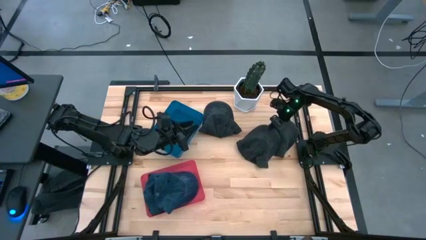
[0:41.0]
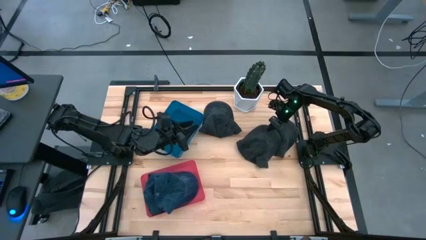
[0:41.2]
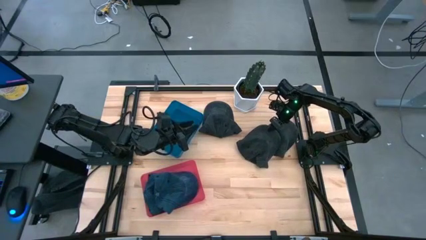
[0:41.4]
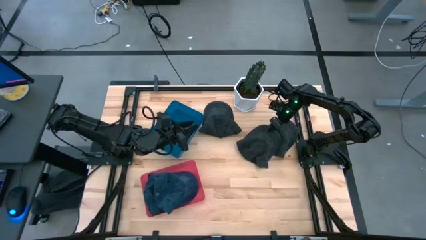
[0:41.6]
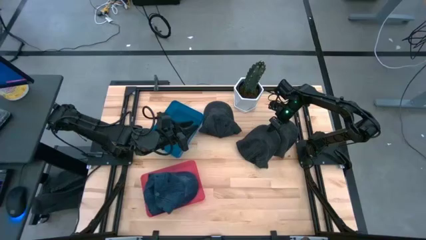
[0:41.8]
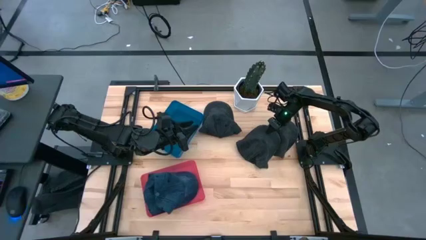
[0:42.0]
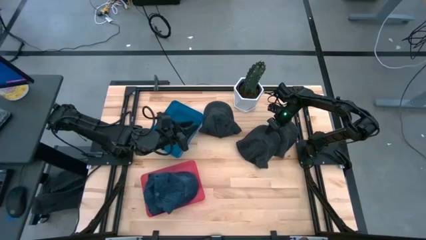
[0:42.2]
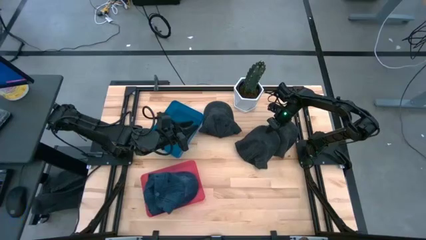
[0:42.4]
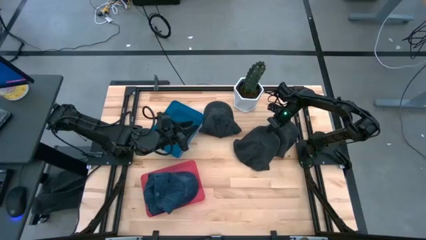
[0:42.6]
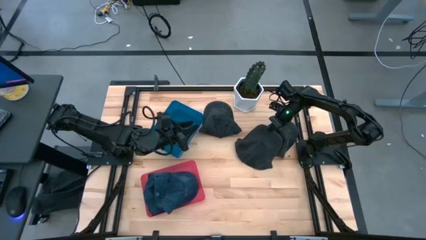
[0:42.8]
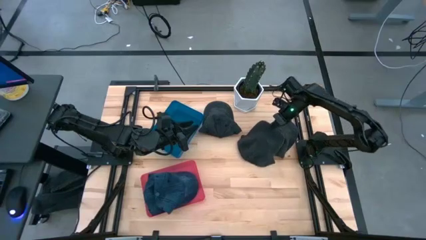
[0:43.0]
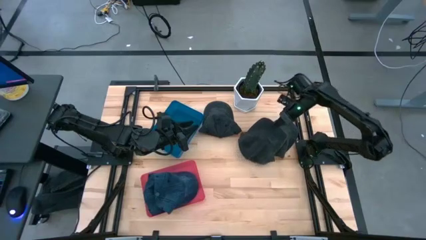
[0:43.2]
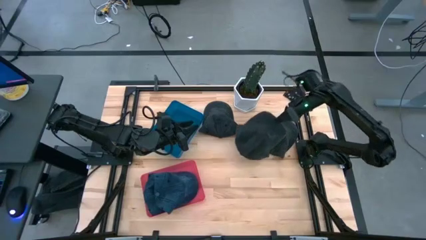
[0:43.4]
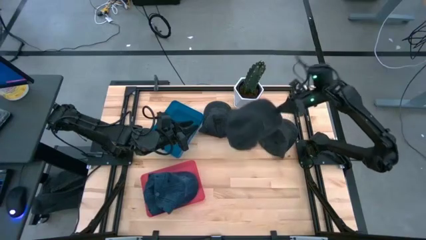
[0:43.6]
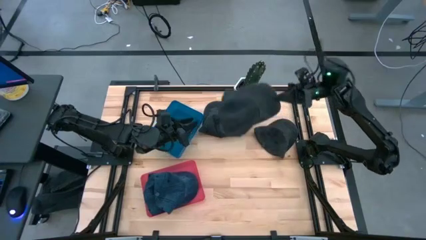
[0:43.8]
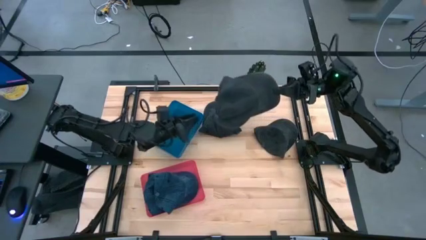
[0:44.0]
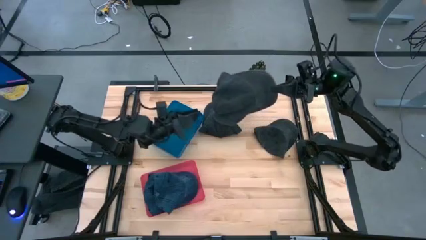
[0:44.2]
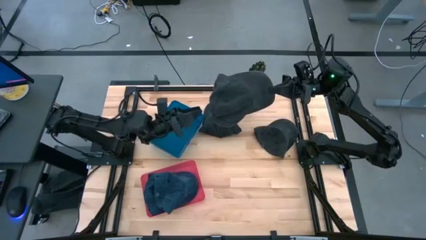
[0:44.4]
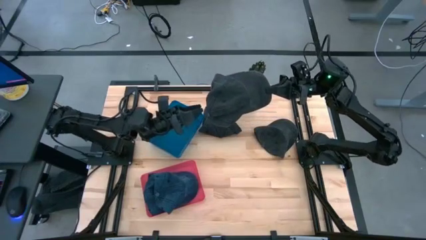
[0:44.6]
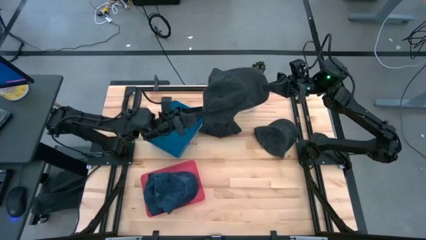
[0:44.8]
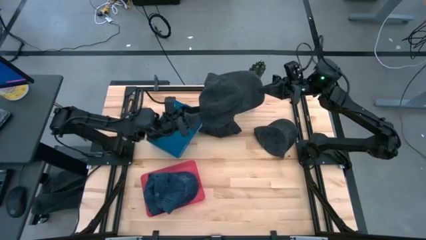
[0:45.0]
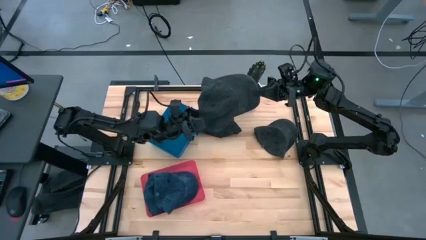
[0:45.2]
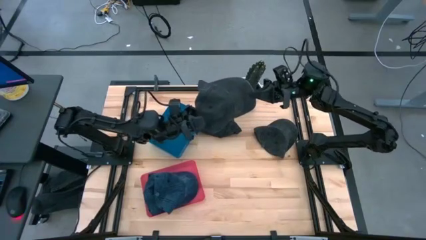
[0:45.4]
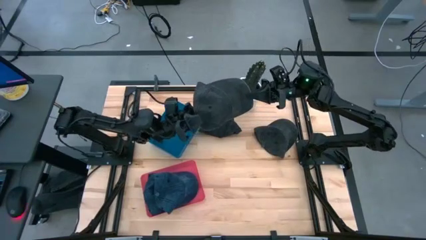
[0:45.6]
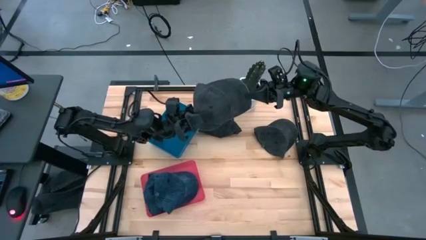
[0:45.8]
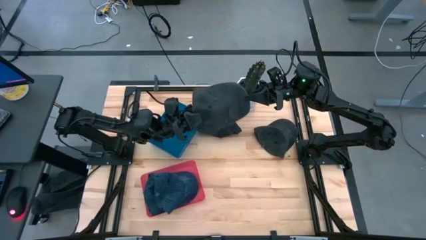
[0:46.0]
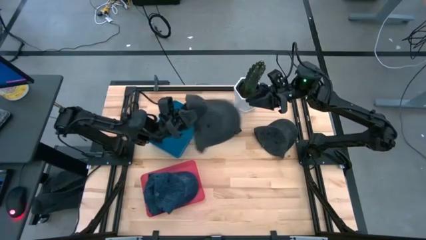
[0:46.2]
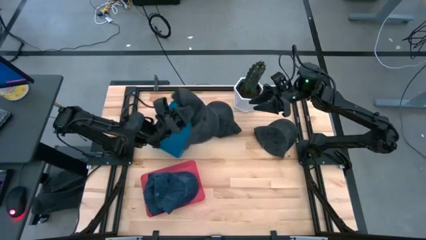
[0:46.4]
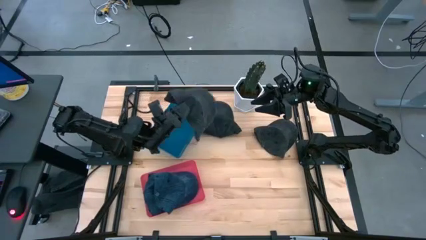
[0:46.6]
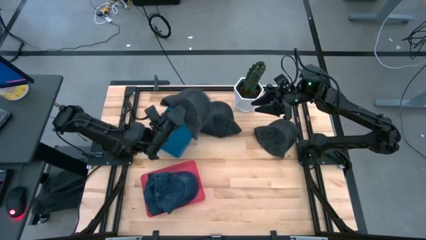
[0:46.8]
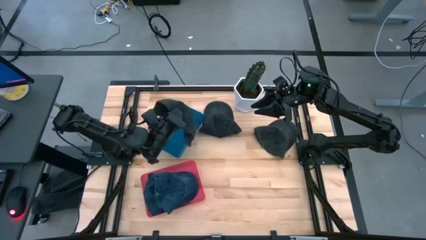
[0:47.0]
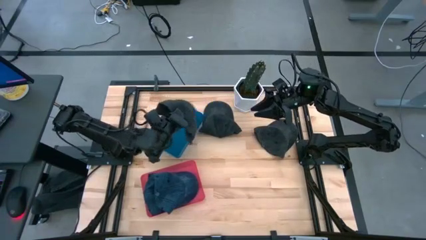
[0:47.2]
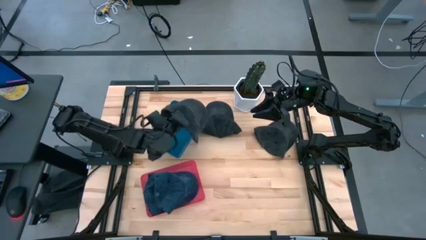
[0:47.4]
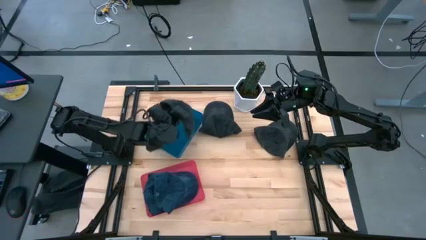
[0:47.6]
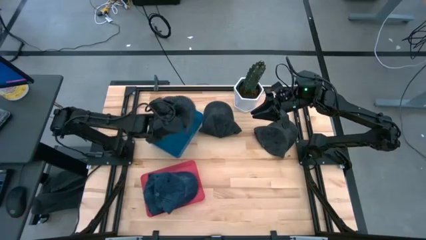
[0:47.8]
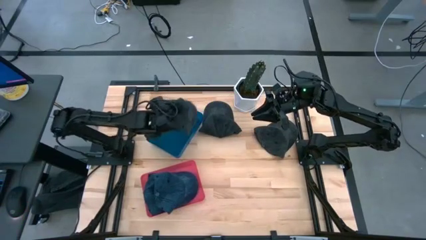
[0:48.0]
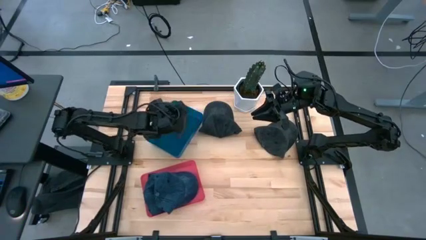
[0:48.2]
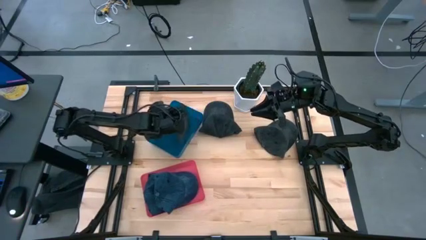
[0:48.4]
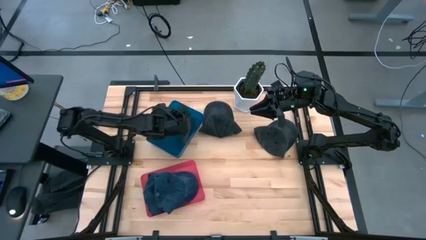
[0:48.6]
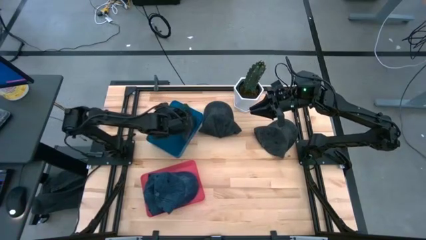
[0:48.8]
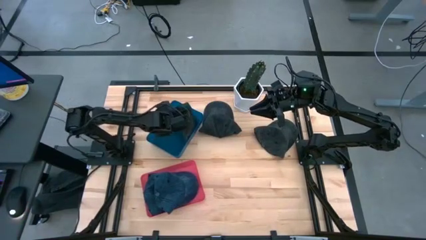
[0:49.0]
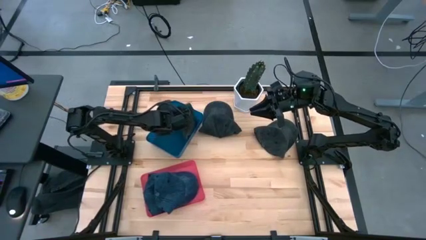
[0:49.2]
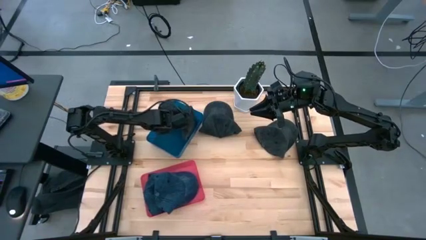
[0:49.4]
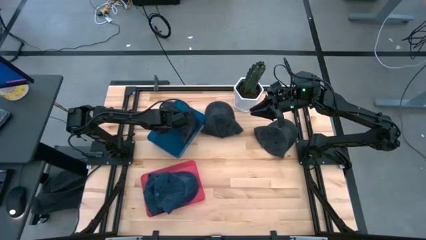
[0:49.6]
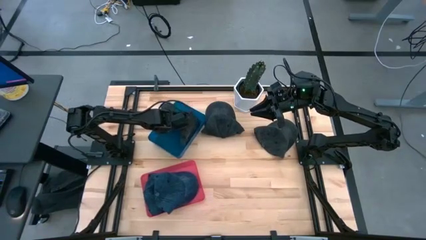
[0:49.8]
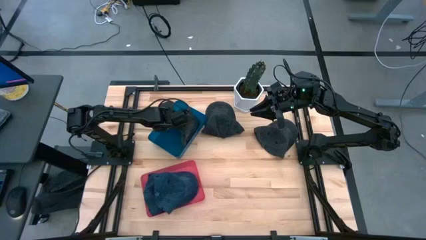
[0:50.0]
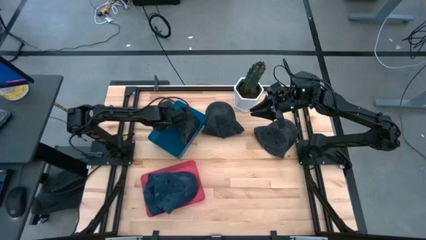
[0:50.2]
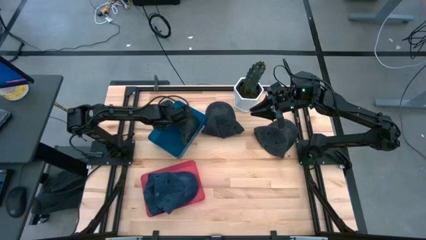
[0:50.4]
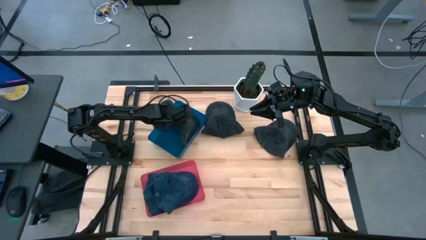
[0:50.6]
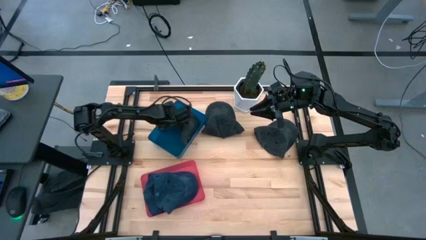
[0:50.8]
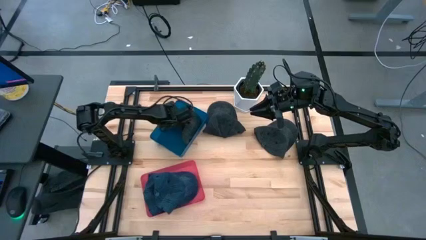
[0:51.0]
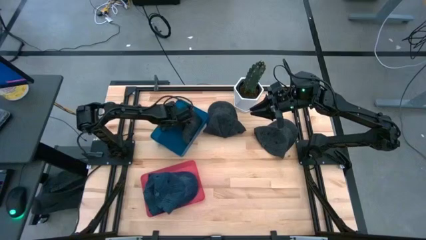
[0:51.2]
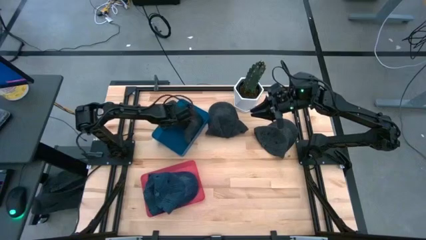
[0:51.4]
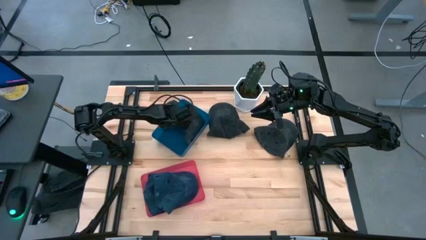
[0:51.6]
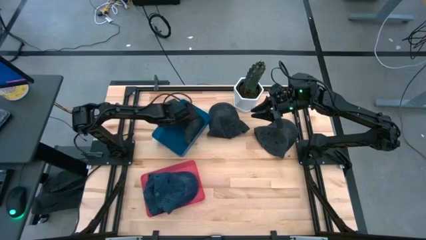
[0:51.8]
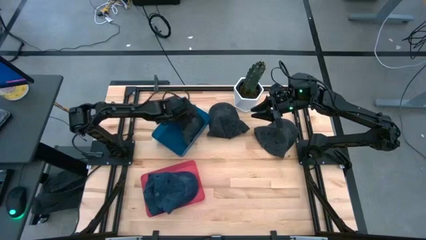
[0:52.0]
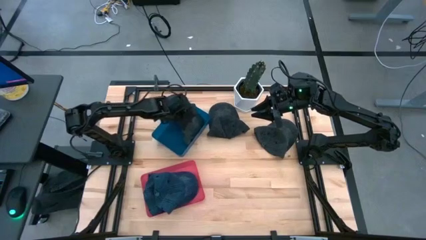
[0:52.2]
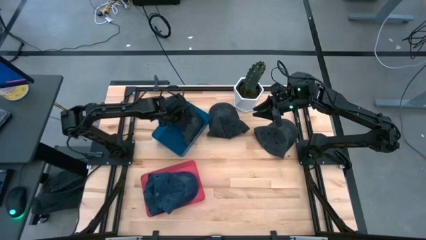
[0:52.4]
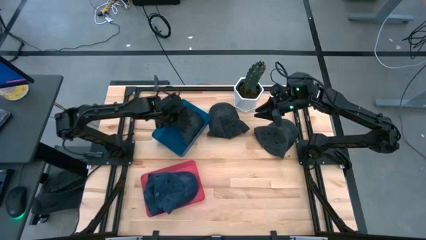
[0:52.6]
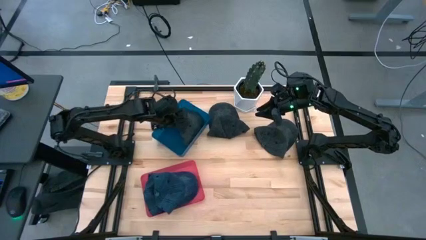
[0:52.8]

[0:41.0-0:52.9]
Task: Pick & Place hat
Put the middle black cap into the blue bin

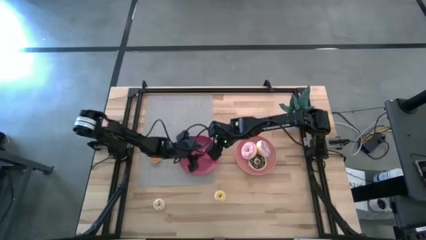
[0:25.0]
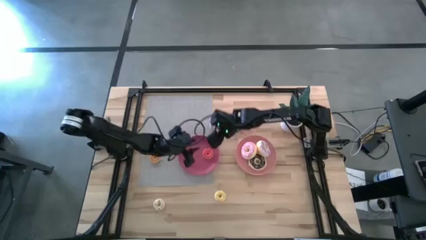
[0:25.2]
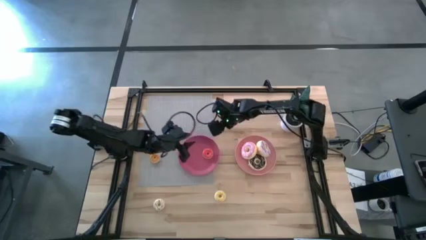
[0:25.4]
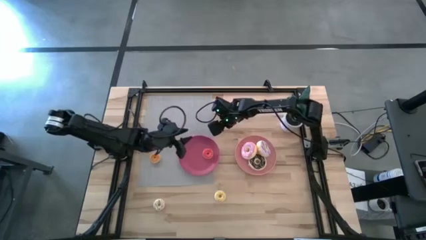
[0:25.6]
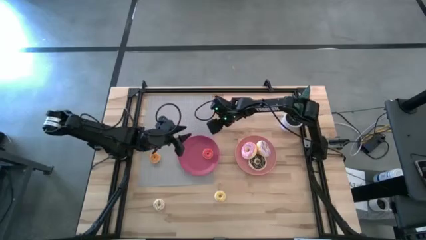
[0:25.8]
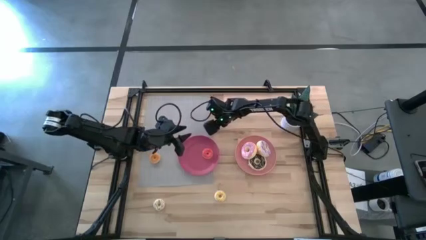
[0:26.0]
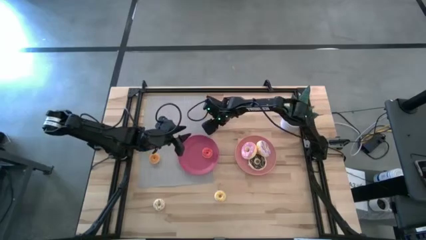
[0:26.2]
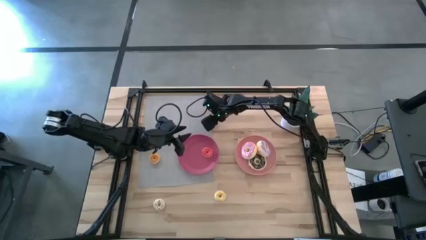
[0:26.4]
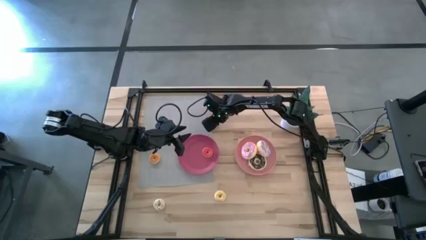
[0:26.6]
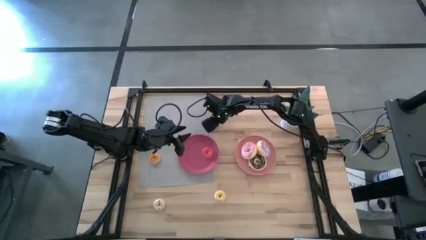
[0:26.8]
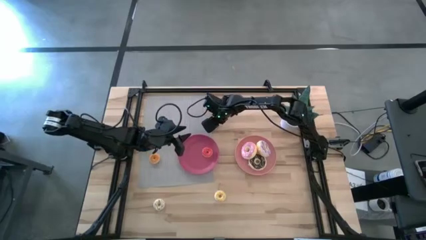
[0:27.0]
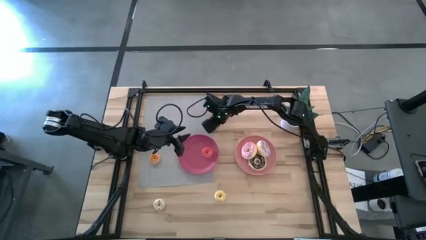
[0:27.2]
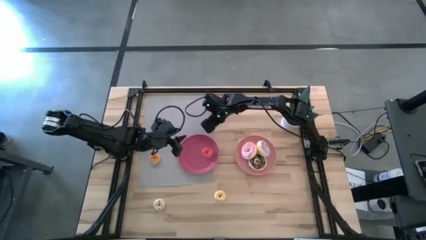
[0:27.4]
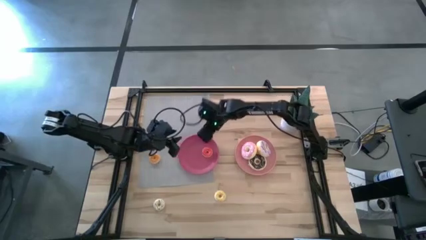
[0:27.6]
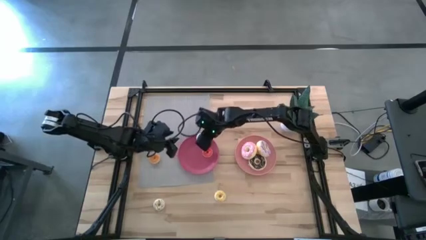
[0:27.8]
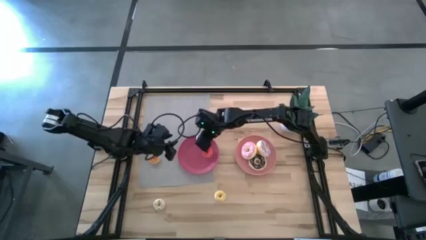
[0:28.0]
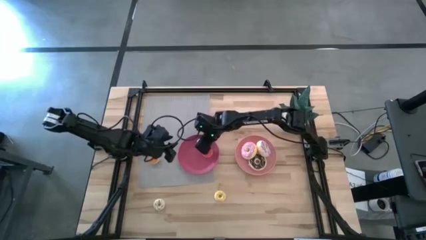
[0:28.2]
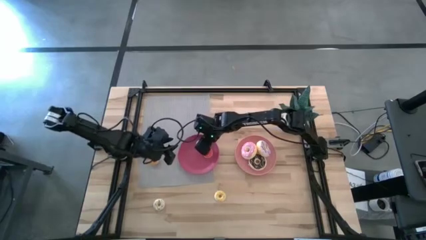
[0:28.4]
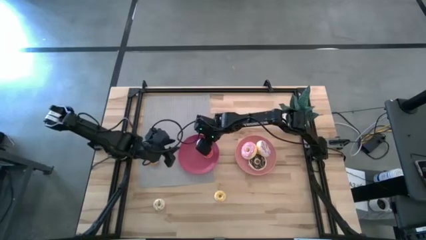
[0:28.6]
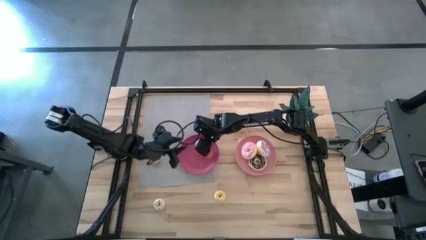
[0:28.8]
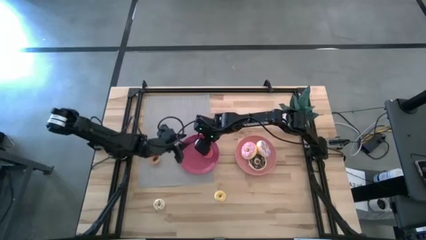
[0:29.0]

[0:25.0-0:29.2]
Task: Pick & Place donuts
Put the small blue doughnut into the pink plate
